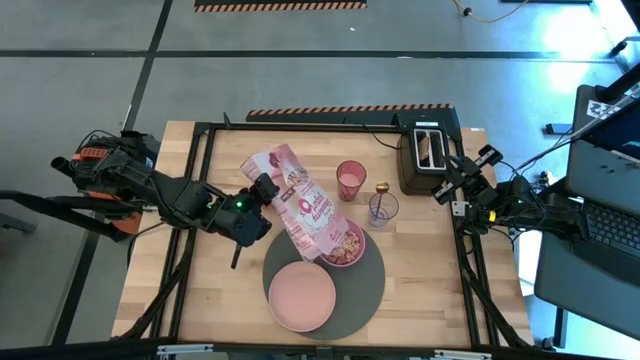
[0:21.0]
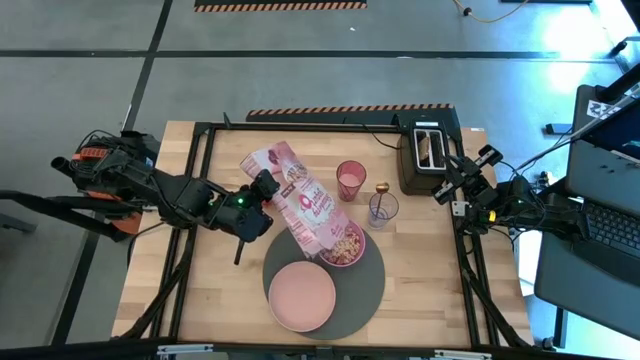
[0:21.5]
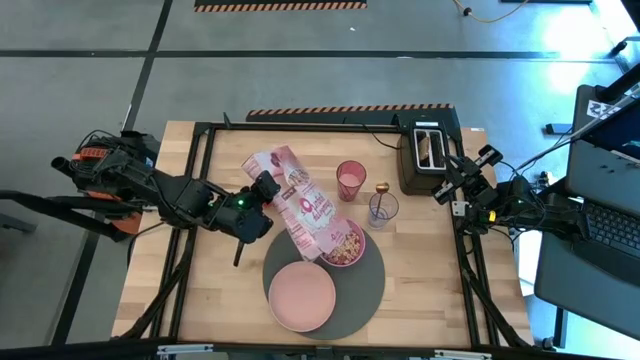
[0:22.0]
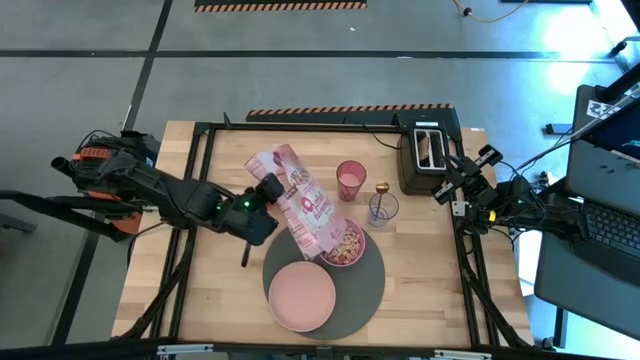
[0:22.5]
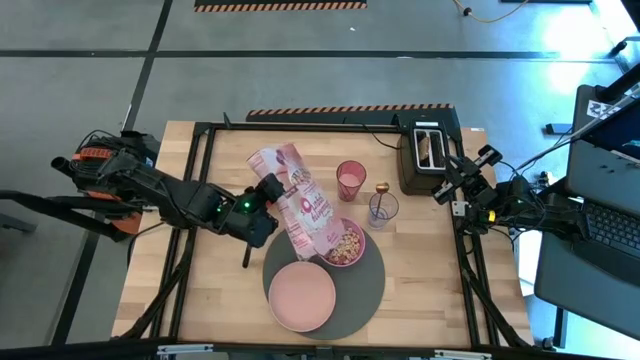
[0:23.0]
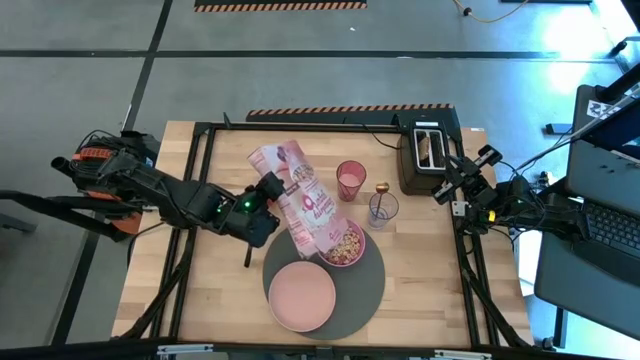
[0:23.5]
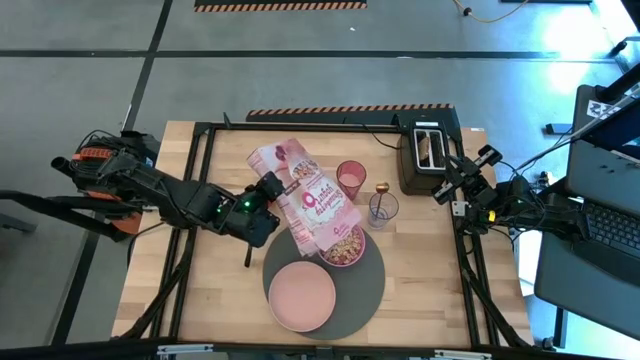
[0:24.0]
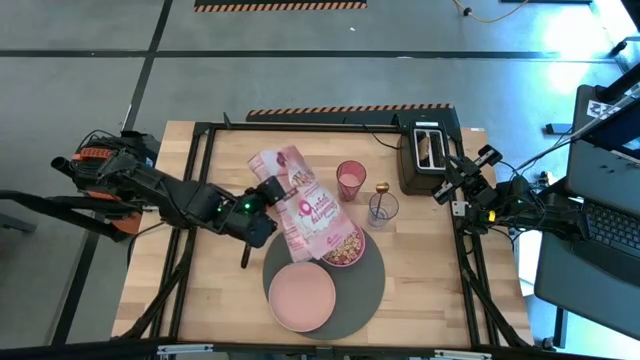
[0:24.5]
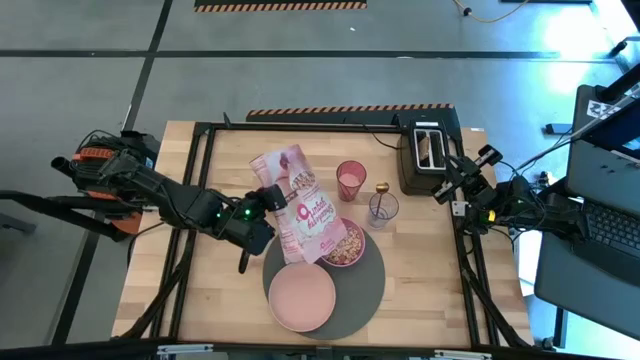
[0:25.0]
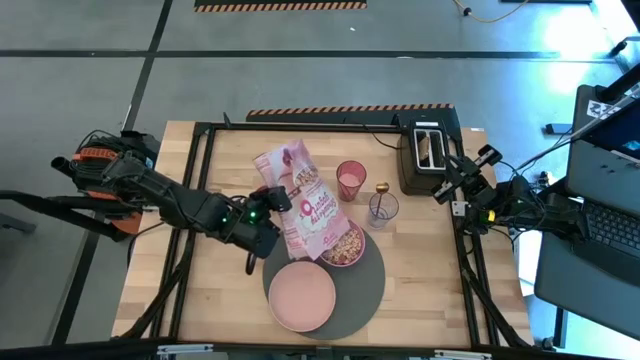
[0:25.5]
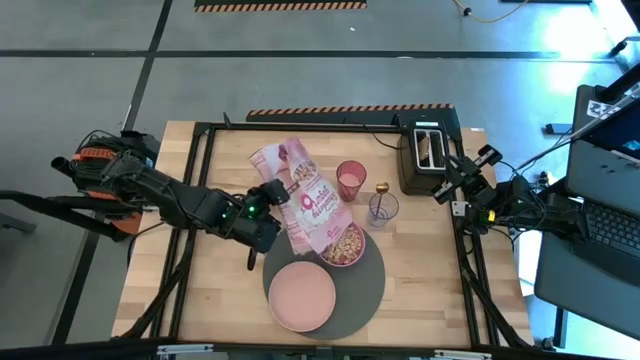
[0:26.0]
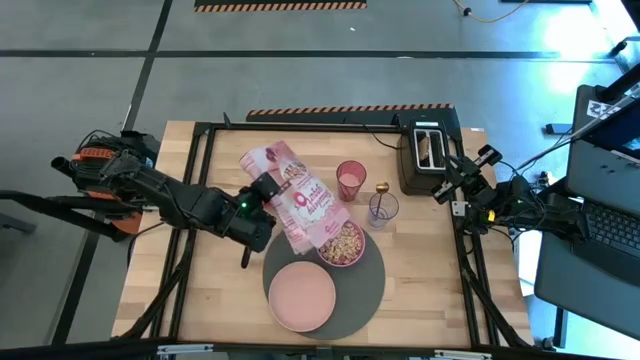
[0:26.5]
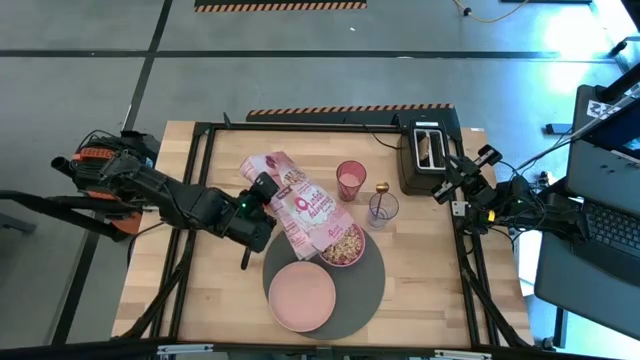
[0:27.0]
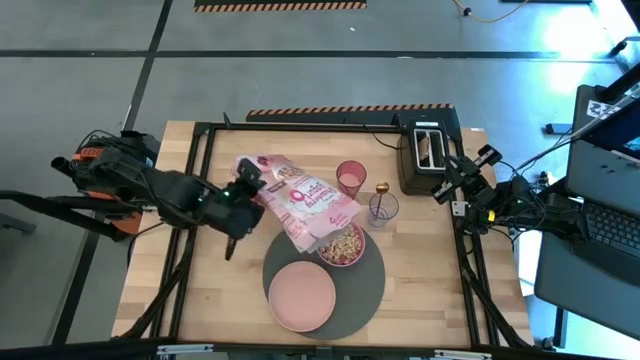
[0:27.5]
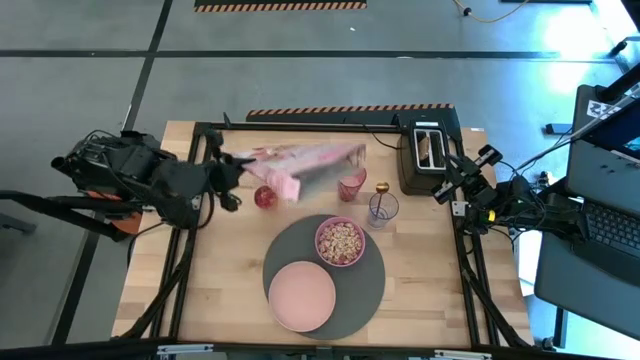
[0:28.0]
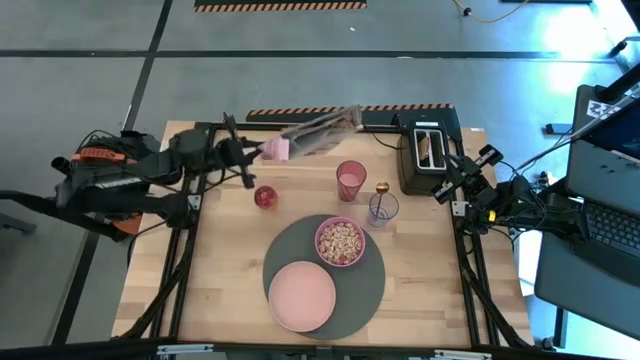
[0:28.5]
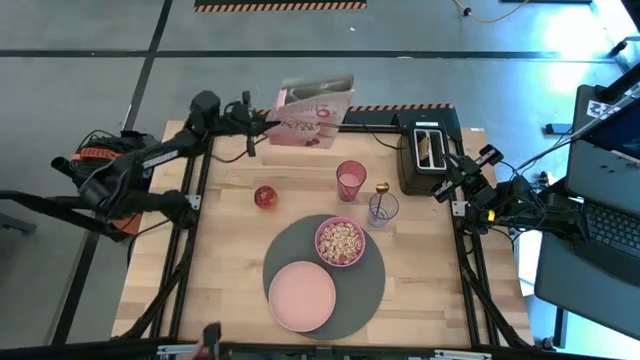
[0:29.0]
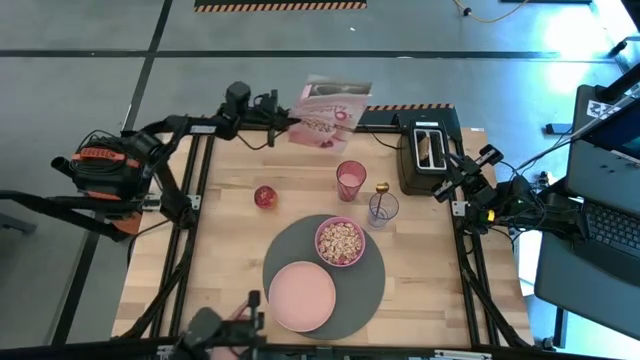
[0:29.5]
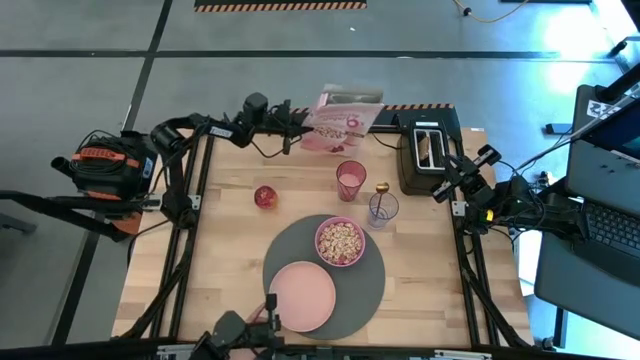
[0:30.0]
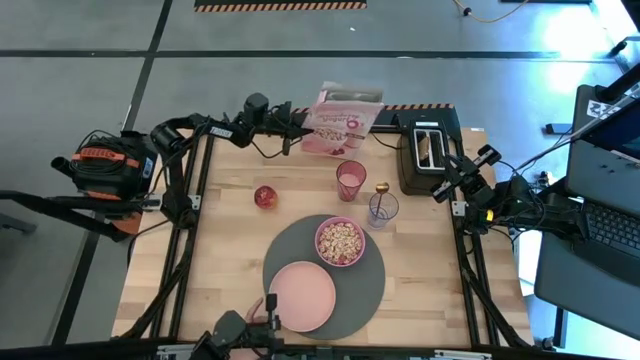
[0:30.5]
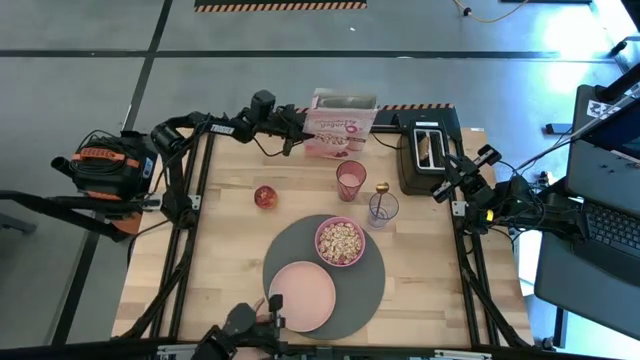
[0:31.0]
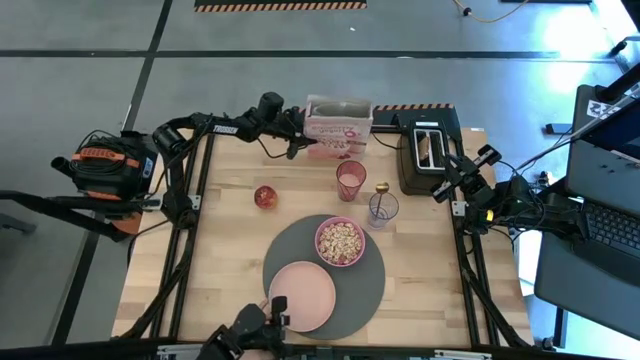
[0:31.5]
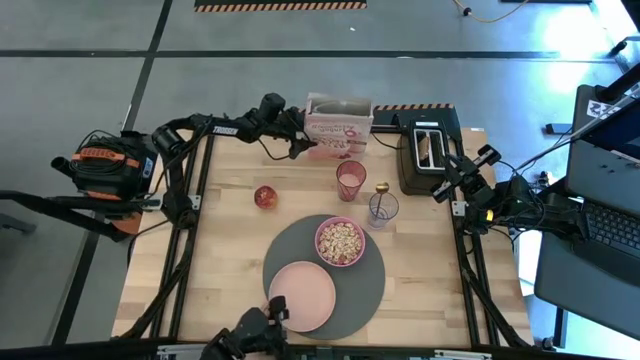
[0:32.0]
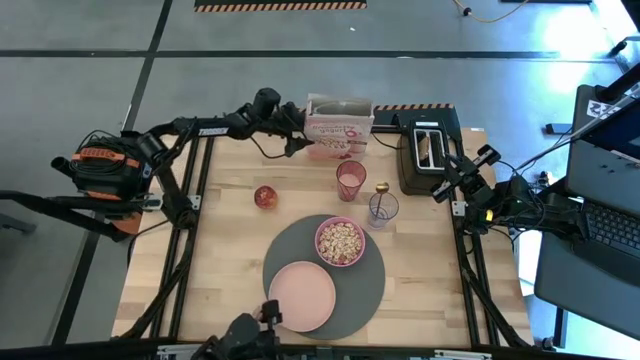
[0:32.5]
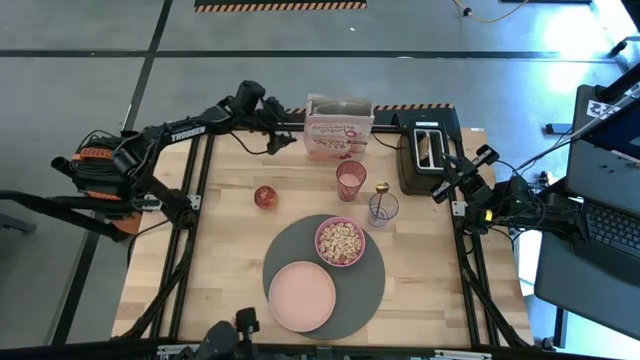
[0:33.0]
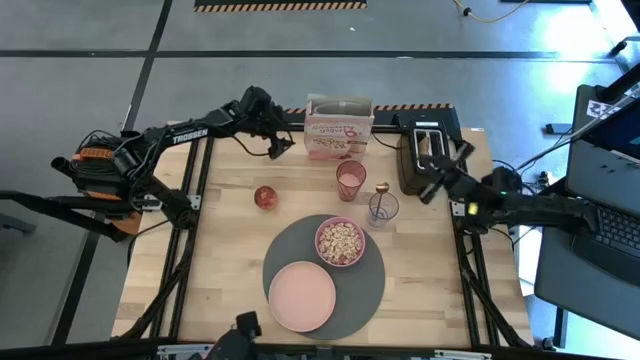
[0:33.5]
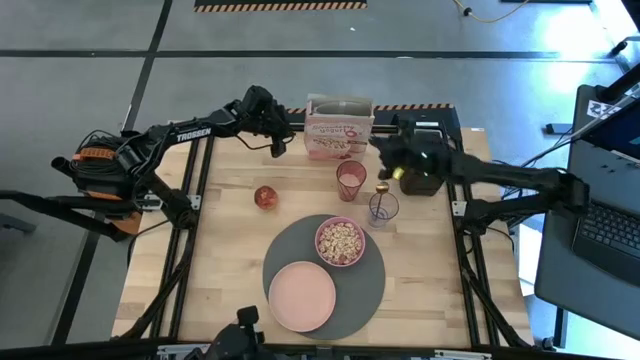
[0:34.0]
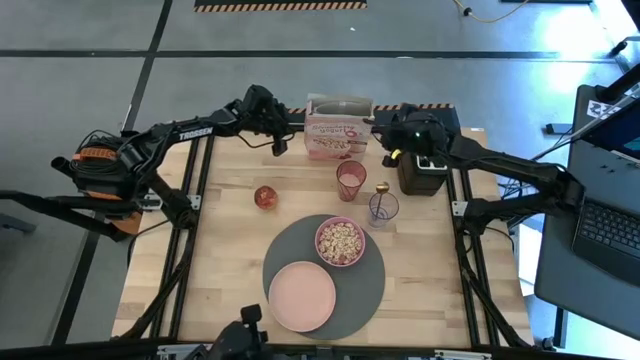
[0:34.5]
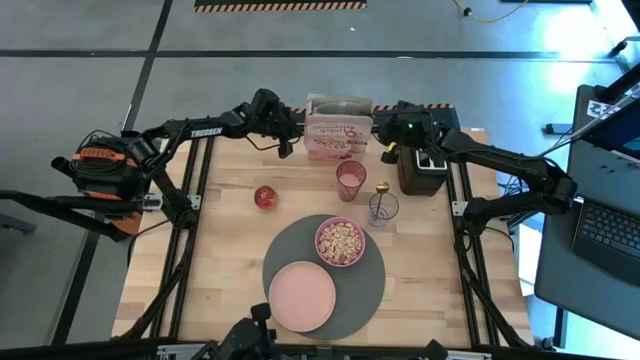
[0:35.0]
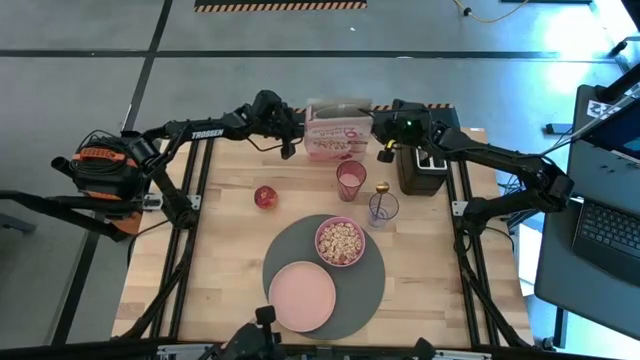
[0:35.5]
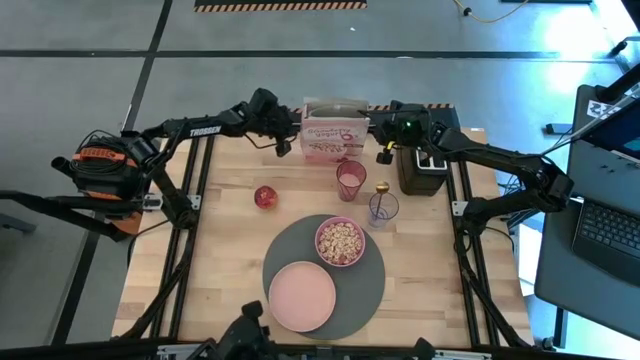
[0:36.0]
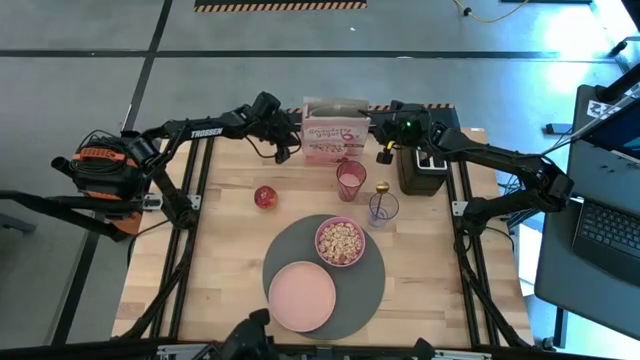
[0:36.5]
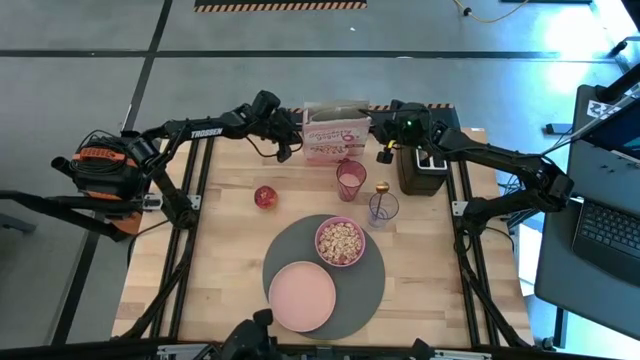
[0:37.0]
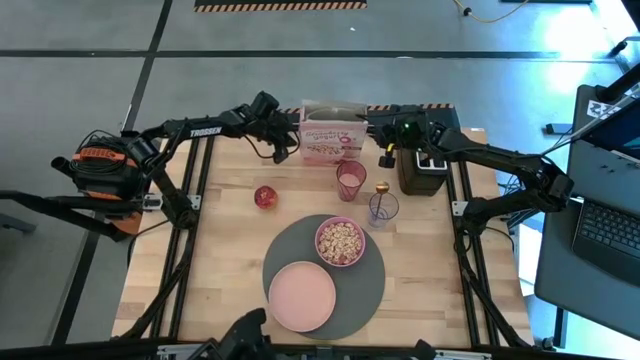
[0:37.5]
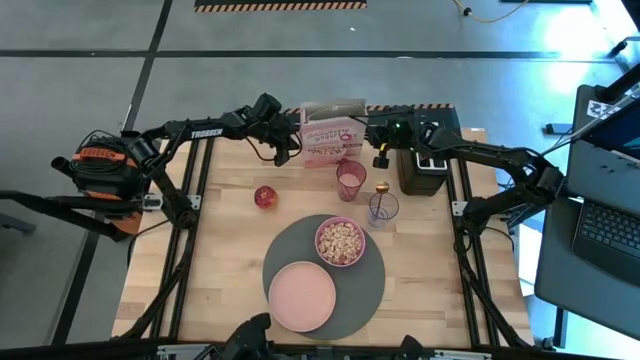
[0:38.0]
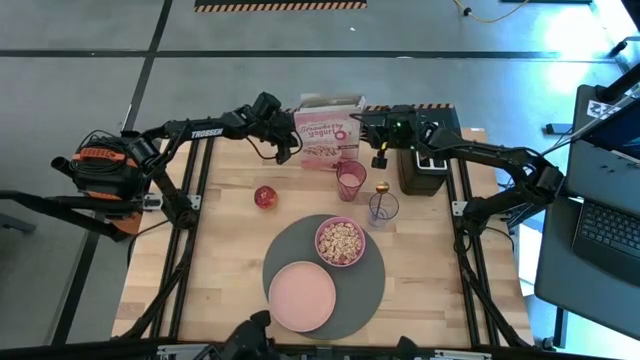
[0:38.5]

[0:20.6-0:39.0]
Task: Arrange a breakfast setting
Pour the cereals from the pink cereal box into the pink bowl
